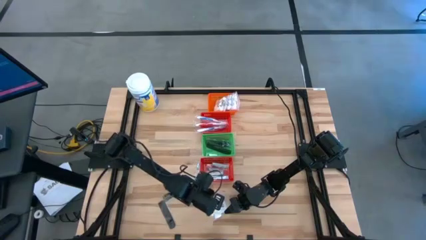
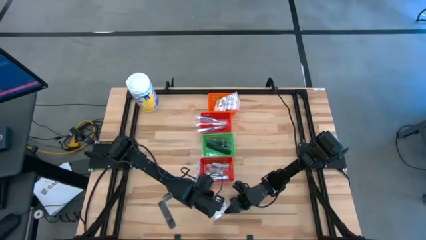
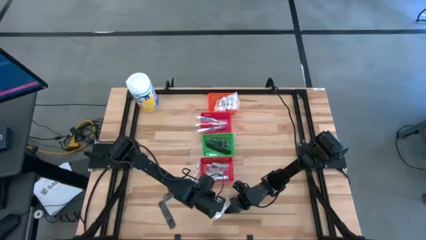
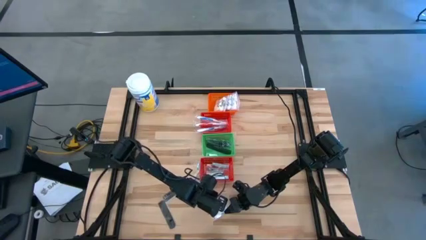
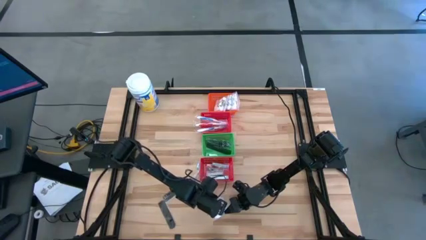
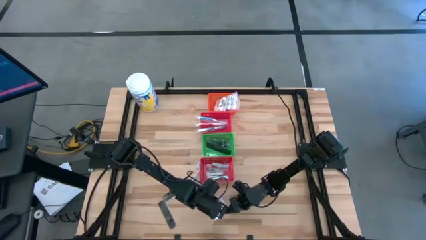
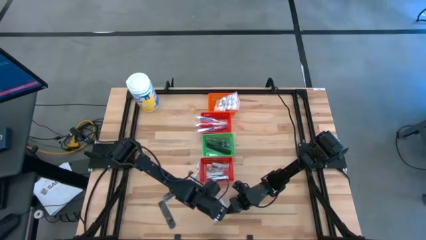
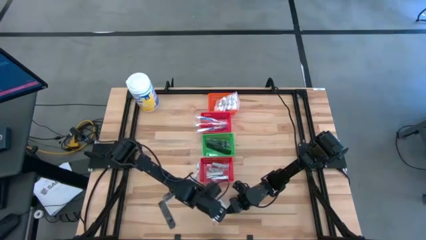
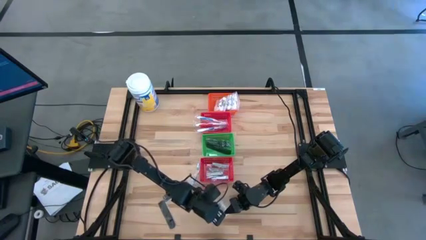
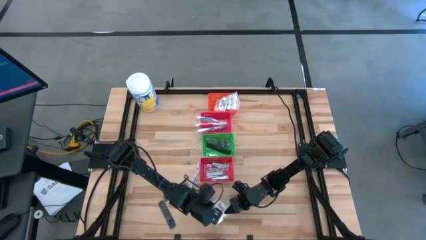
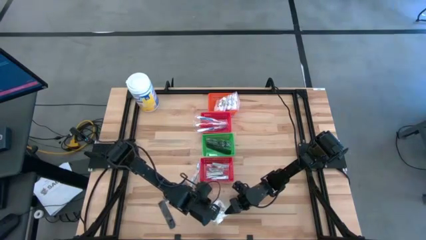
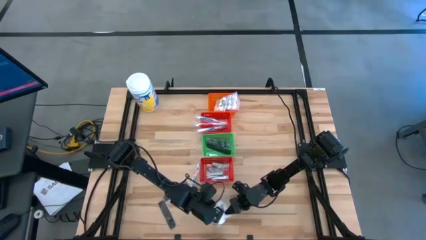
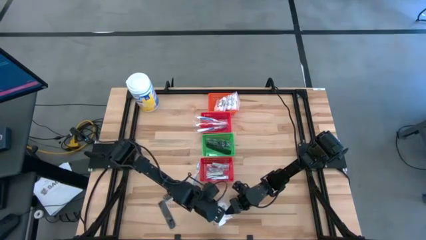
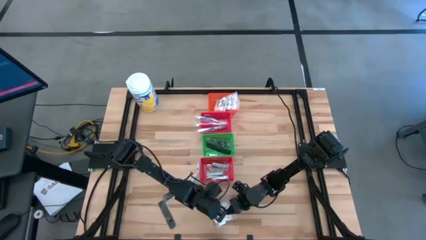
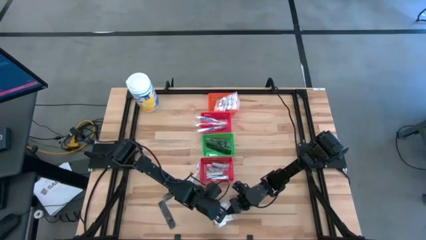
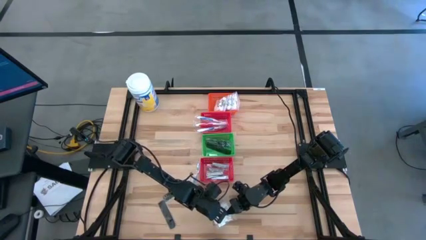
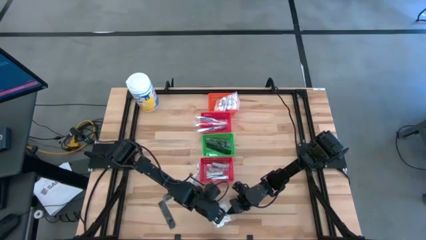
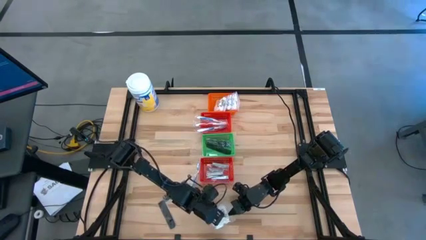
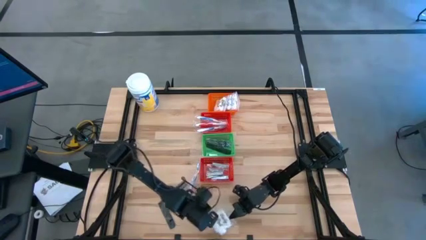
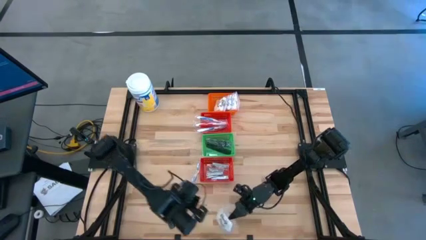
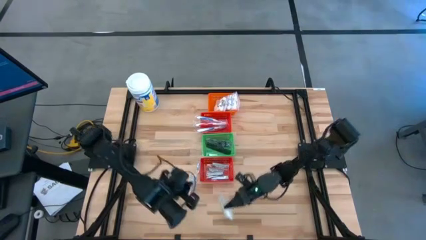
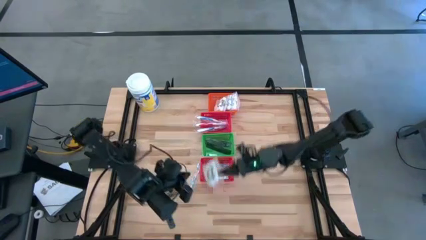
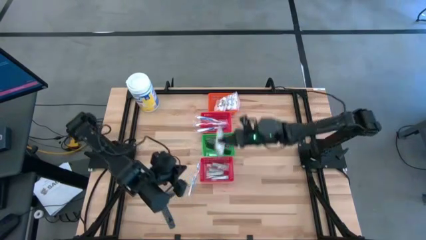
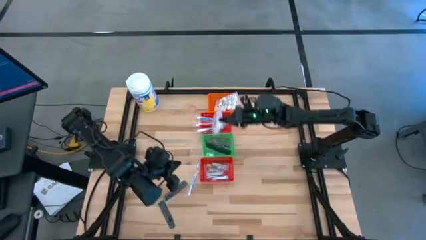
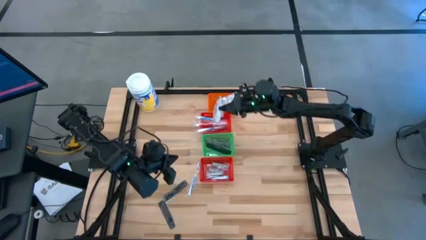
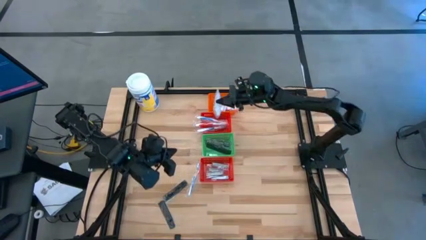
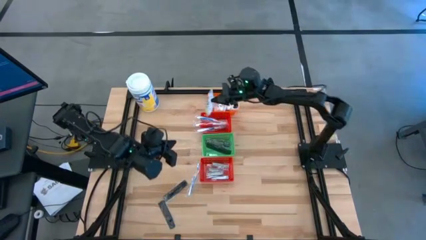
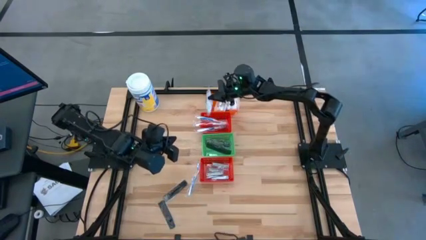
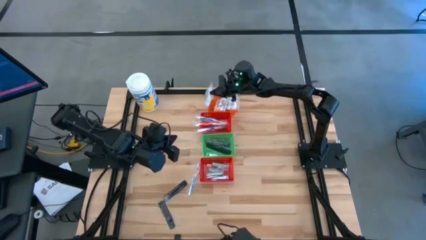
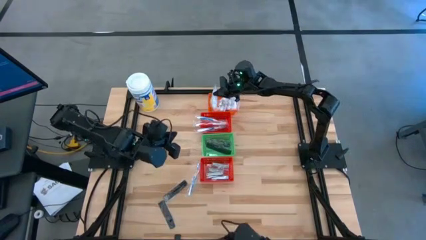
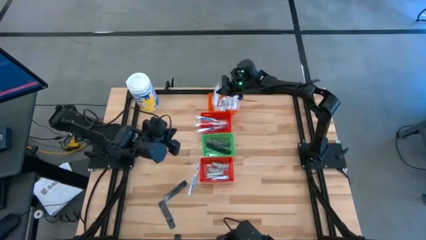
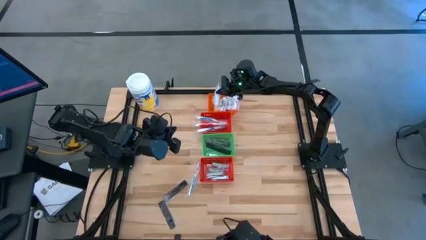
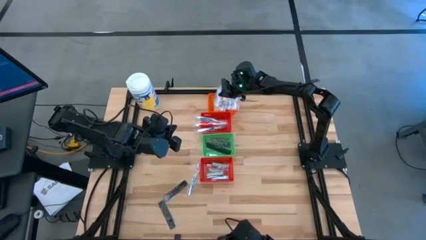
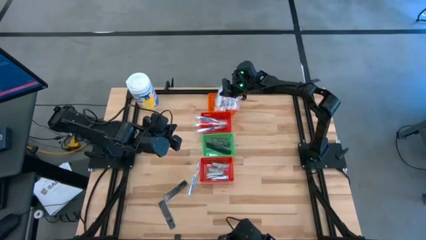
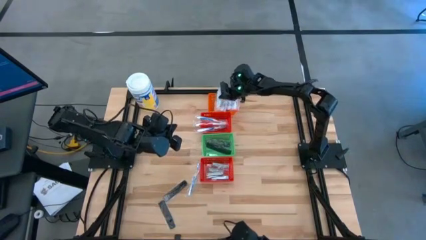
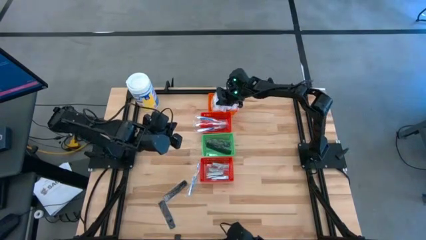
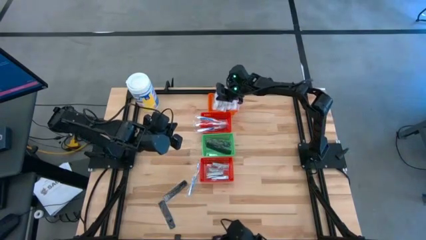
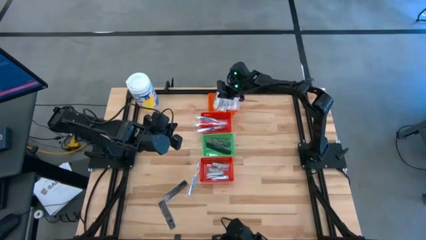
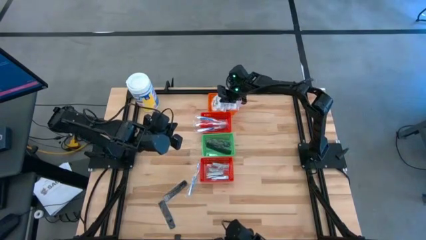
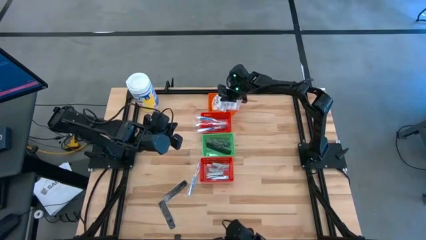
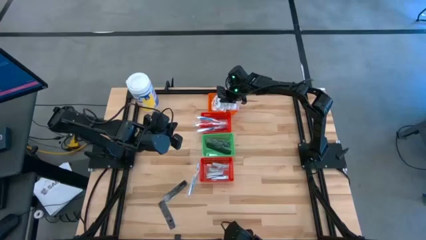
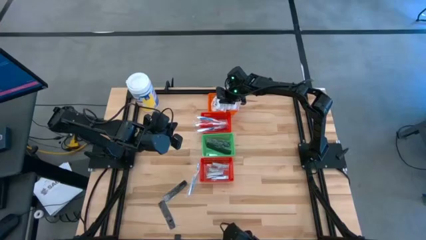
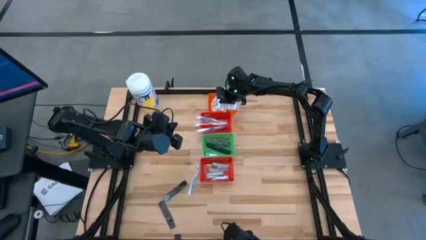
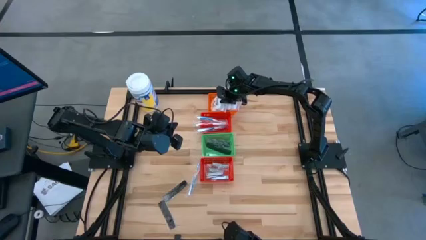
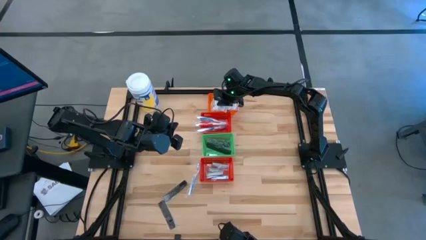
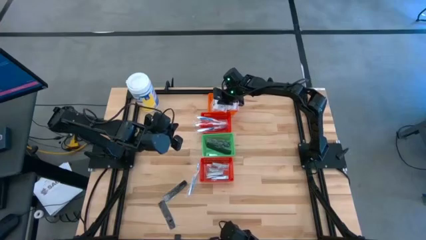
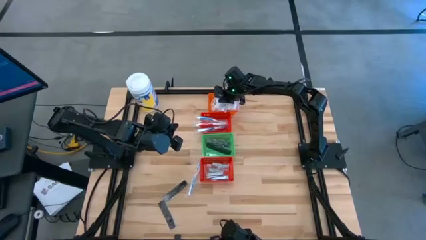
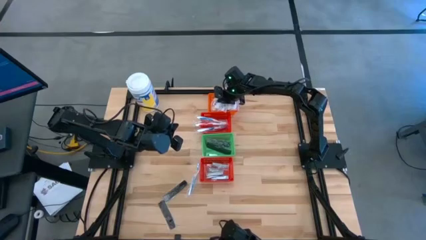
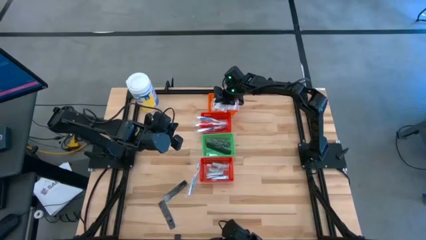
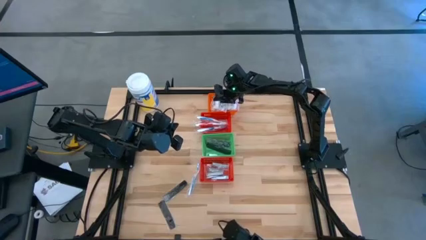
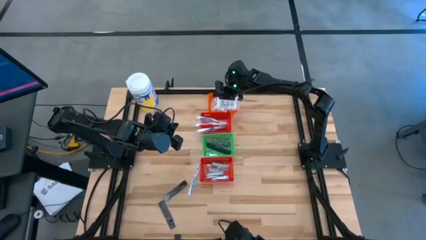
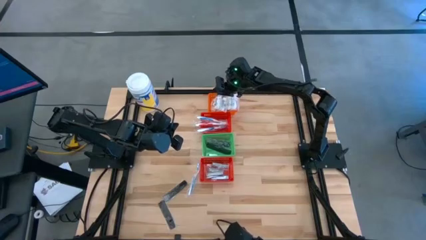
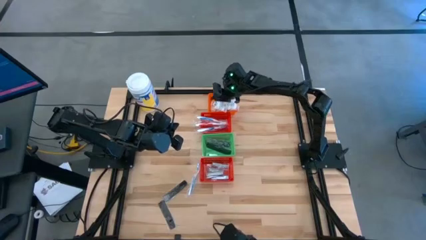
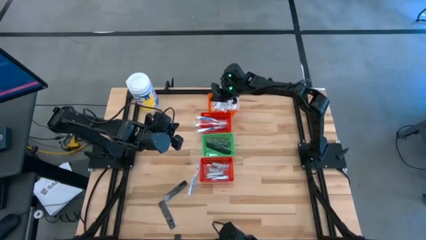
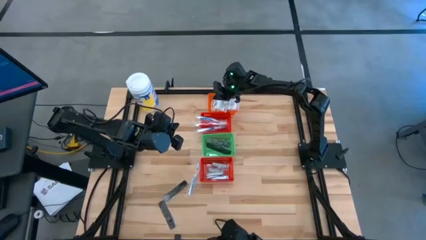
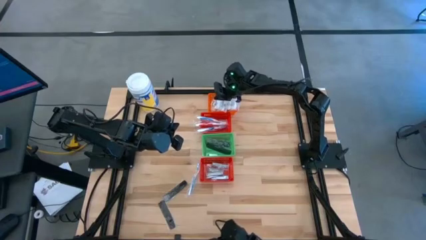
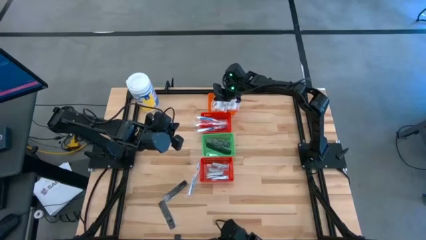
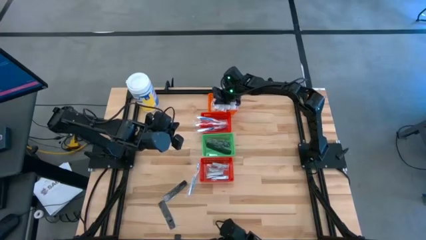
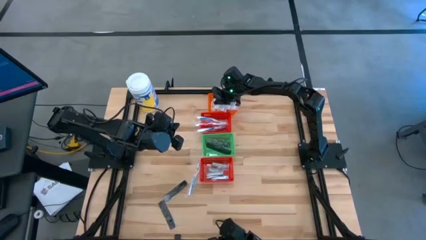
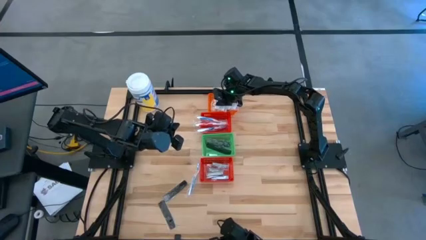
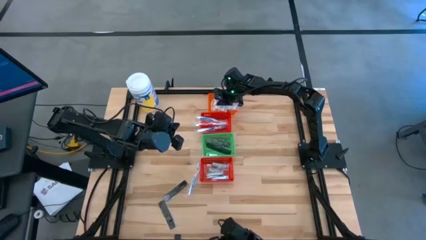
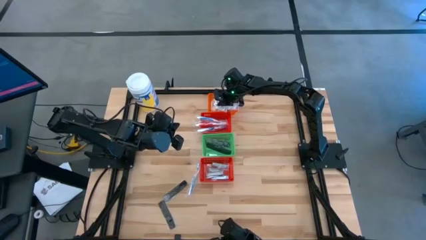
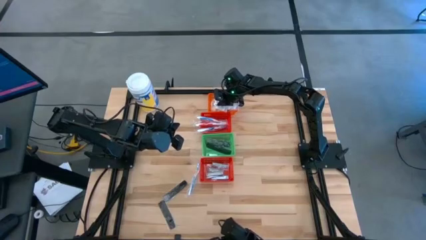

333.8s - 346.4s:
Task: Pick & Place Travel size toiletries
Put the transparent cotton pack into the orange basket
